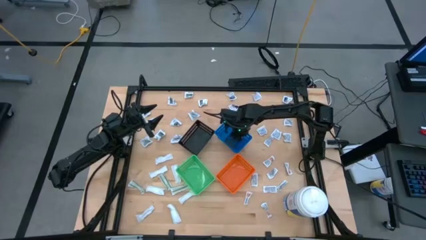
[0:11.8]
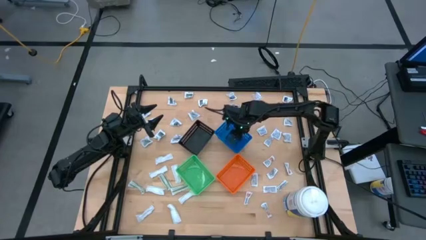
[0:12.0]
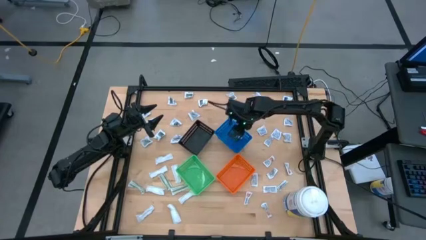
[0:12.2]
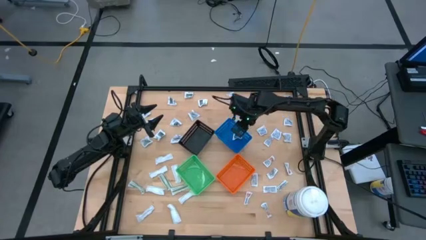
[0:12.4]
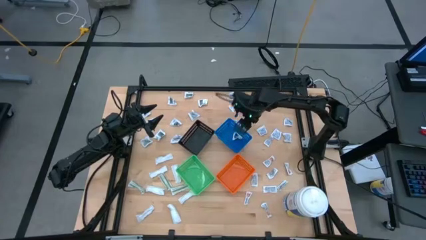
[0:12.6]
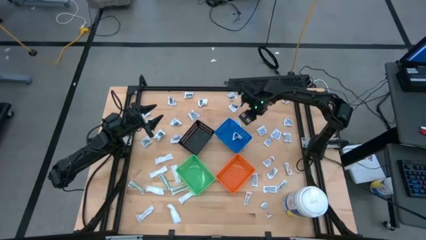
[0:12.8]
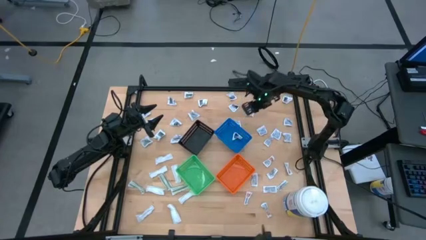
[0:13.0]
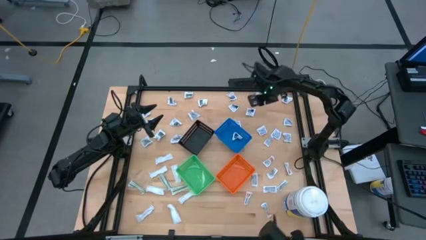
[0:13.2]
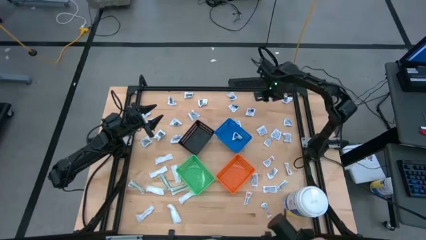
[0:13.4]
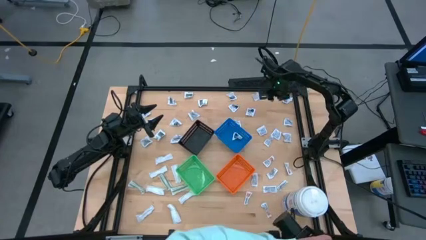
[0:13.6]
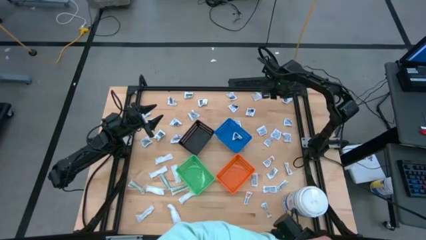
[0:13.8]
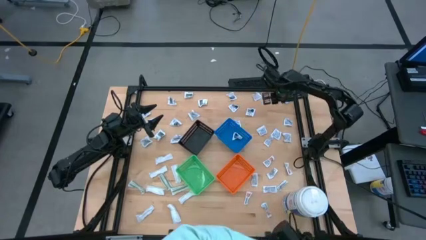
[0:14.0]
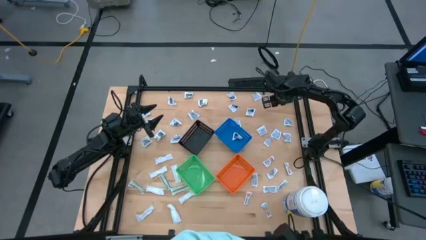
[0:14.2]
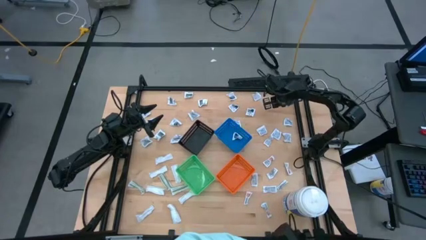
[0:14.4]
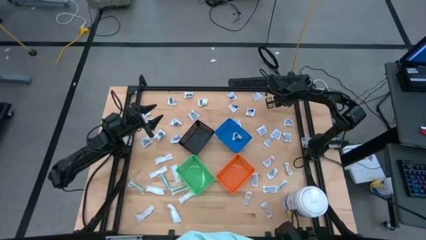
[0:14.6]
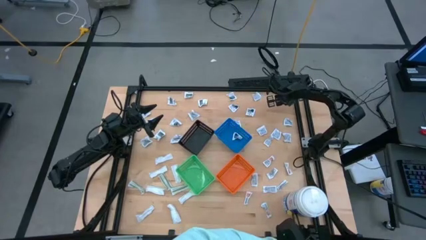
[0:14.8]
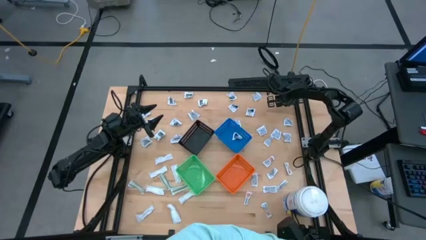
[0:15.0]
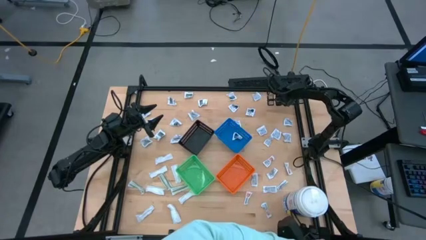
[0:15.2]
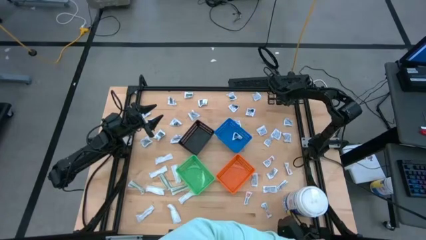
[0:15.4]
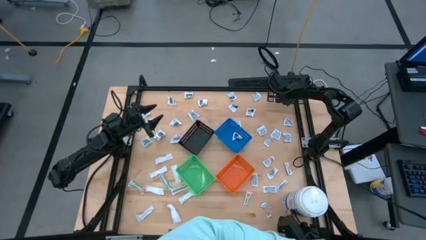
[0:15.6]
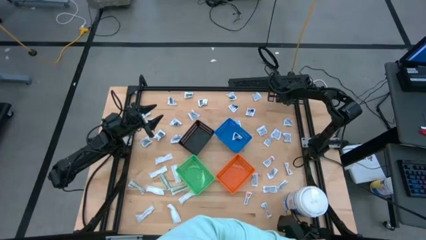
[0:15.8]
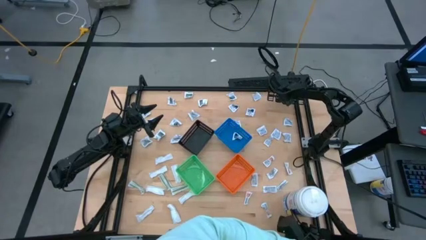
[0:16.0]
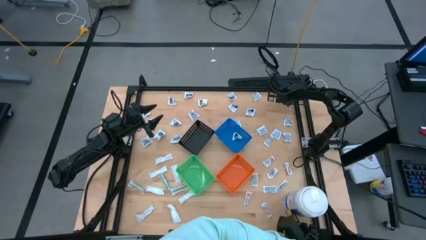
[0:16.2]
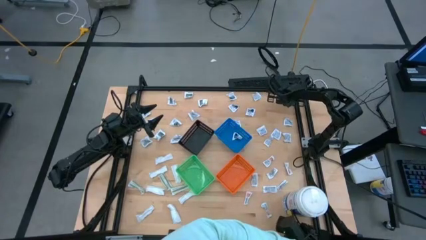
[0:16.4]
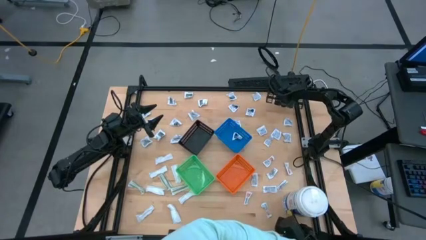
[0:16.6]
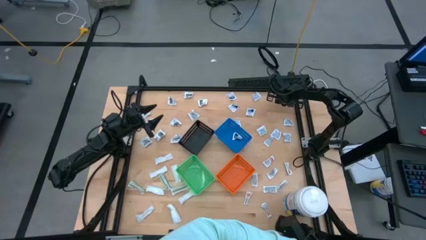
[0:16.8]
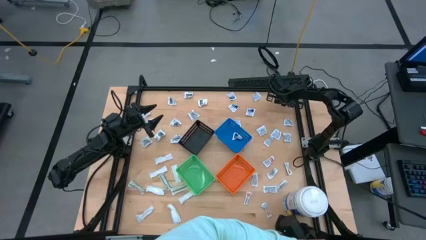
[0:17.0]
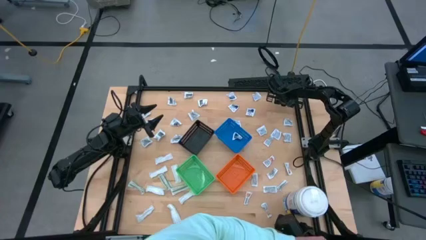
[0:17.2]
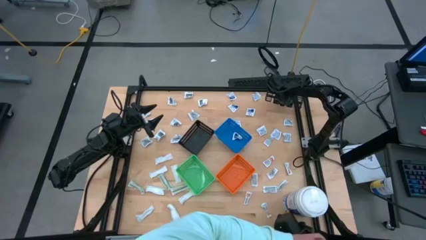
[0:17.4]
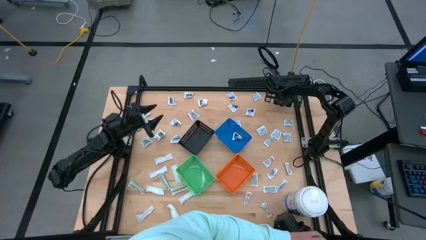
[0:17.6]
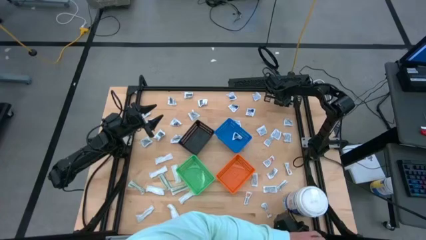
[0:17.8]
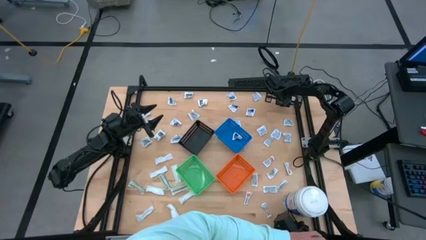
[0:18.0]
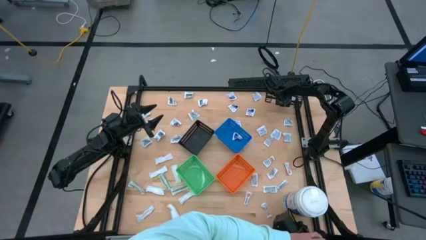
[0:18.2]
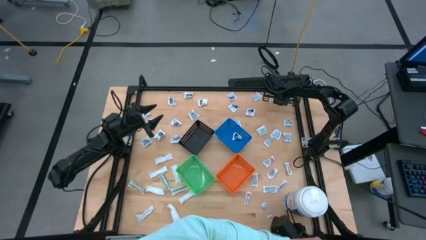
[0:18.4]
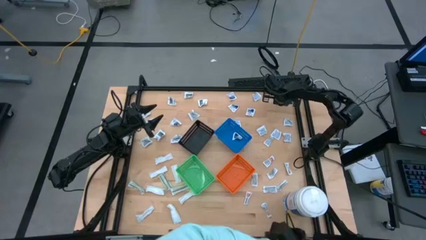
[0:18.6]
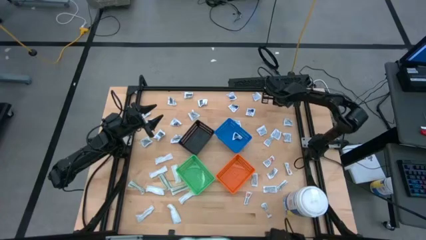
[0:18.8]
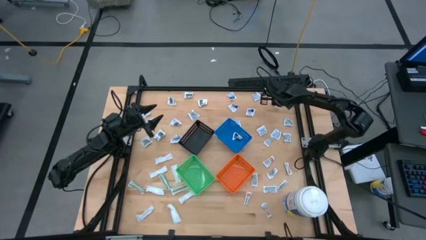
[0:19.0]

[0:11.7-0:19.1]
Task: Pick & Place First Aid Supplies
Put the blue alcohol pad into the blue bin

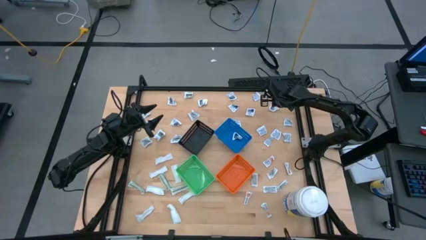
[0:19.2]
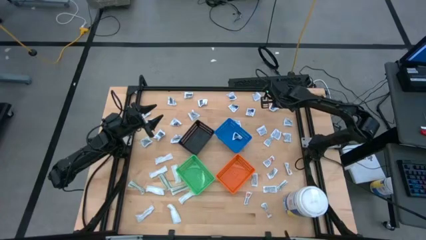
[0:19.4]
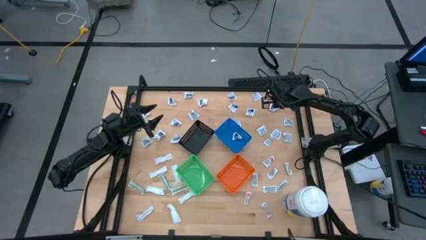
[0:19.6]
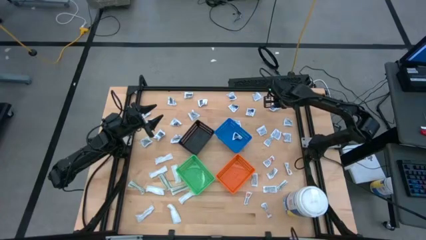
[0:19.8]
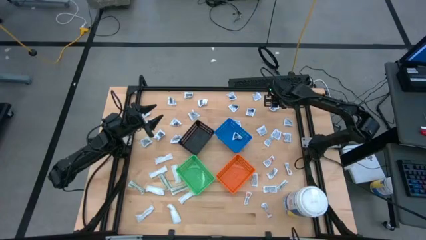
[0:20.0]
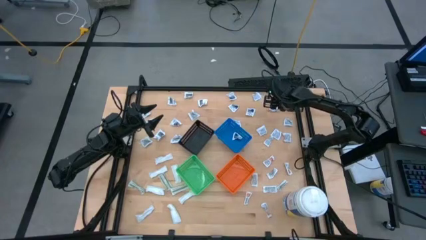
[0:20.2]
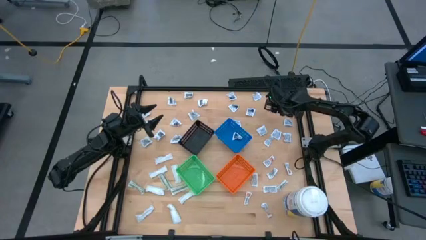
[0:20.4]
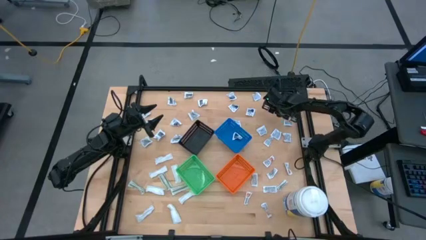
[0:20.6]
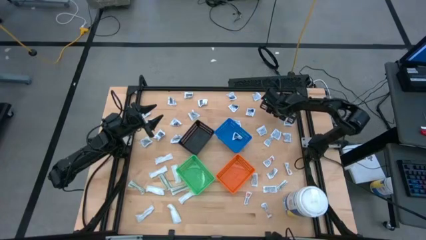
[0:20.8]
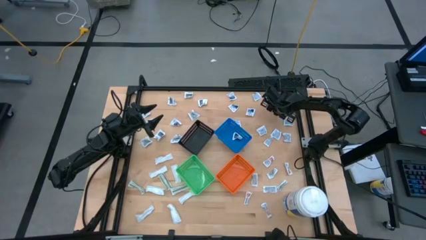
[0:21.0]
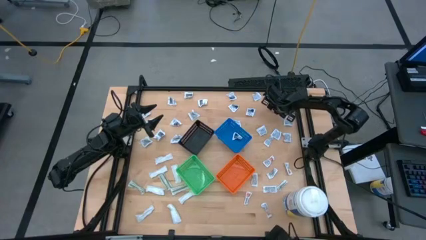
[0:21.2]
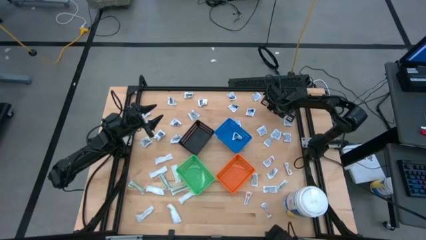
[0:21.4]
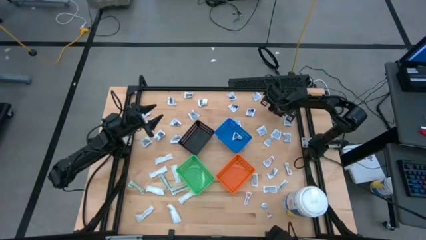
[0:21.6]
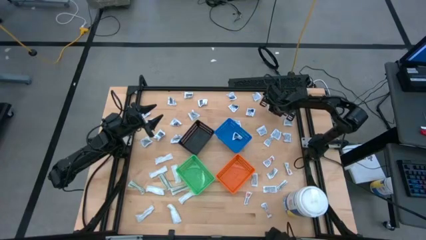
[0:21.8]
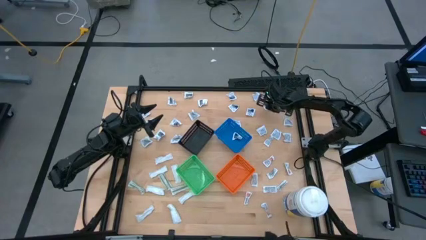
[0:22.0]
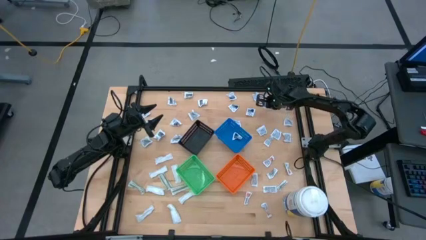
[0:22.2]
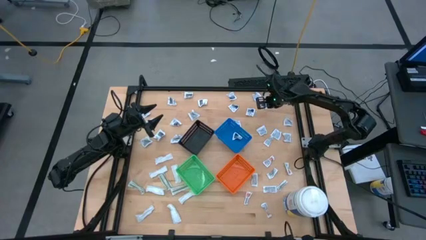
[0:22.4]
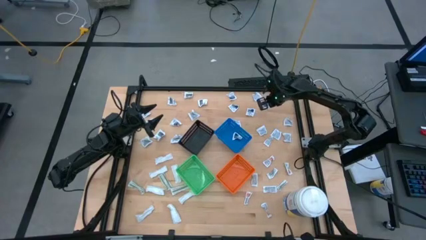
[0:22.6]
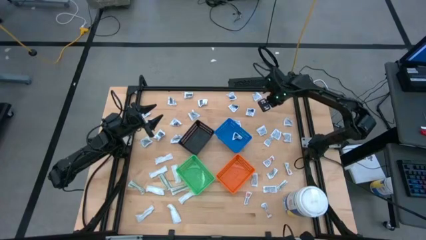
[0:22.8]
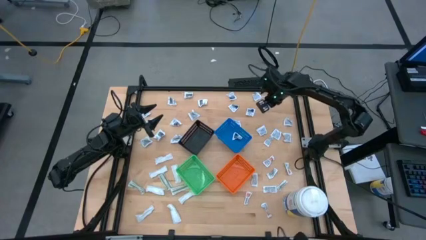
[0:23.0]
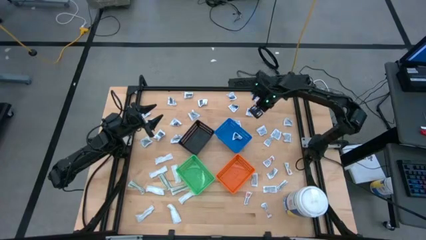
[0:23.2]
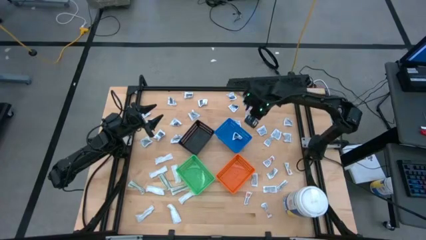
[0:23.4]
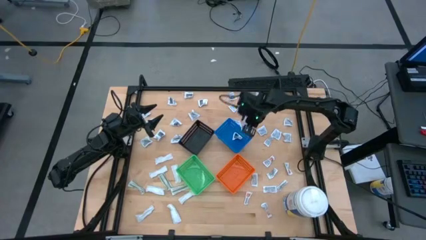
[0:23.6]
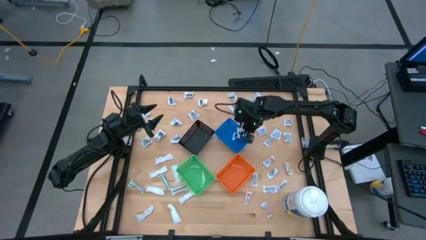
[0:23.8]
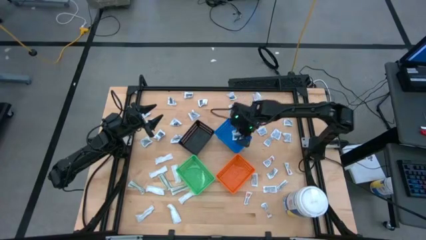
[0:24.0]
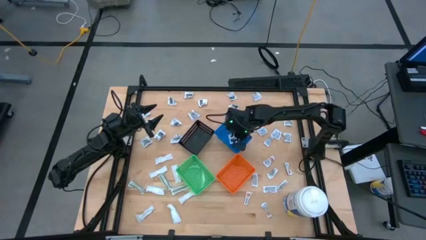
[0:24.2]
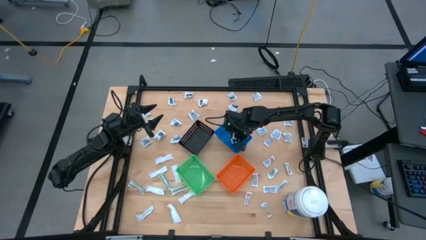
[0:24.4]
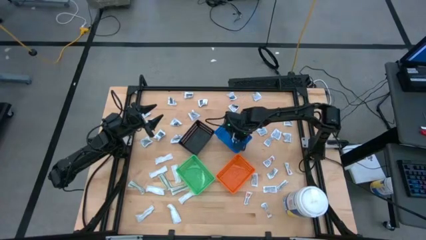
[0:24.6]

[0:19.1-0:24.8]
Put the blue alcohol pad into the blue bin

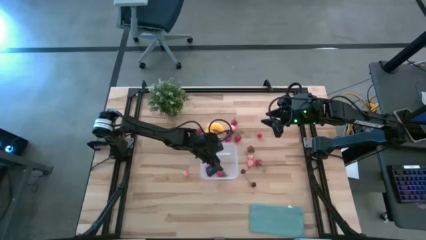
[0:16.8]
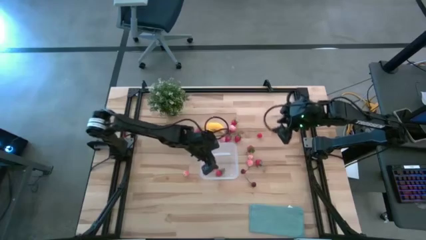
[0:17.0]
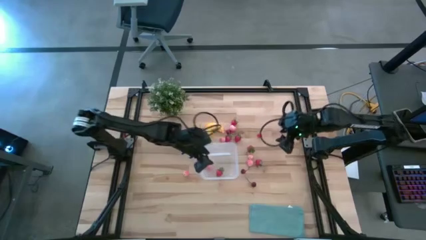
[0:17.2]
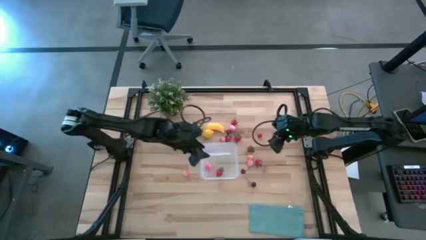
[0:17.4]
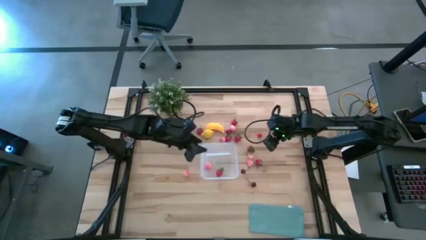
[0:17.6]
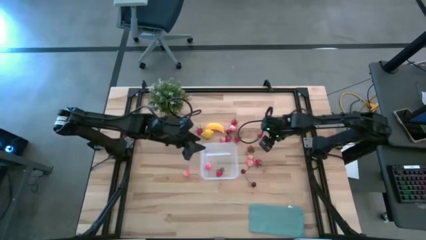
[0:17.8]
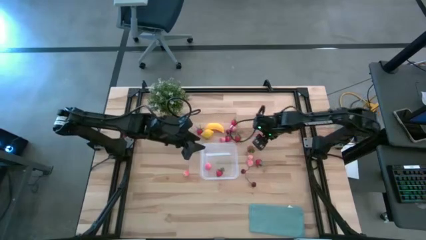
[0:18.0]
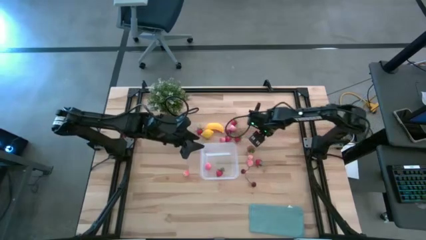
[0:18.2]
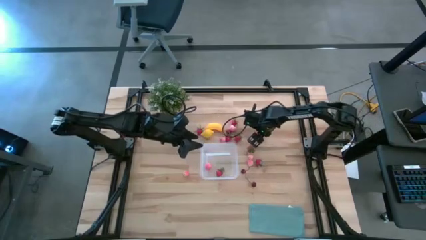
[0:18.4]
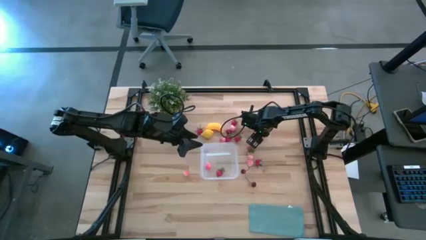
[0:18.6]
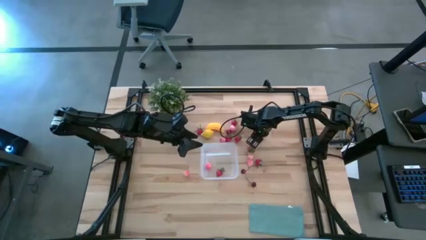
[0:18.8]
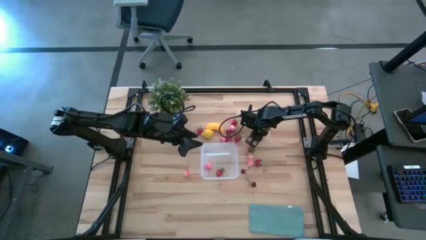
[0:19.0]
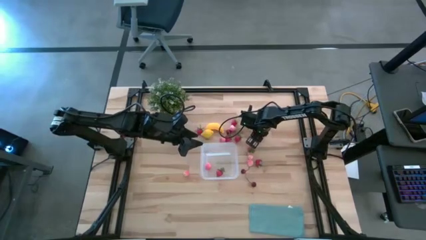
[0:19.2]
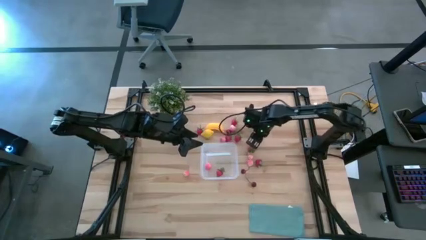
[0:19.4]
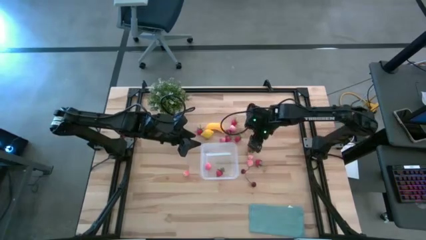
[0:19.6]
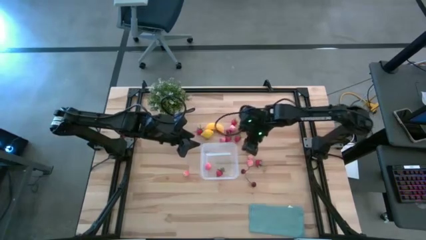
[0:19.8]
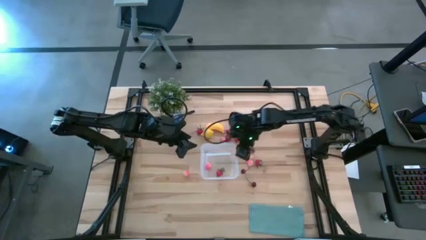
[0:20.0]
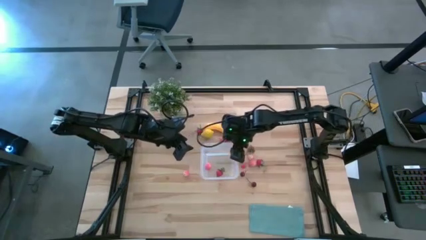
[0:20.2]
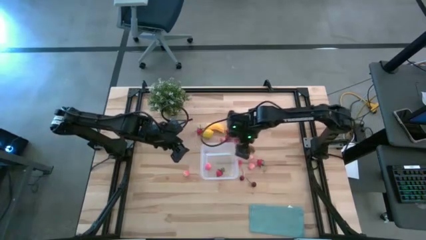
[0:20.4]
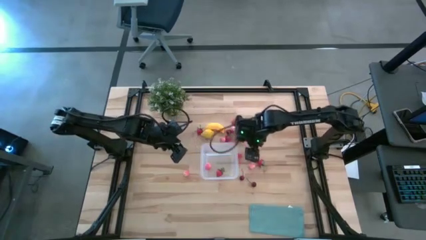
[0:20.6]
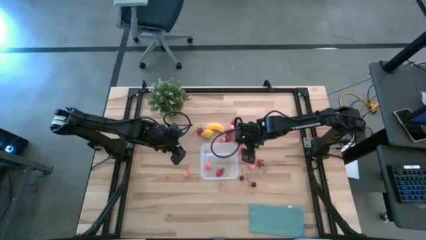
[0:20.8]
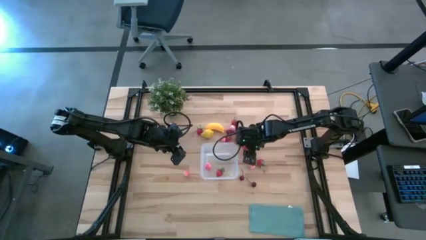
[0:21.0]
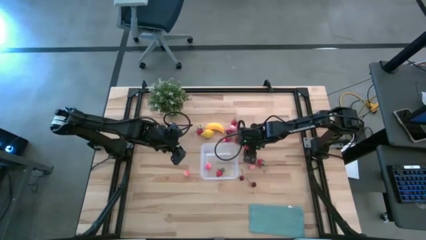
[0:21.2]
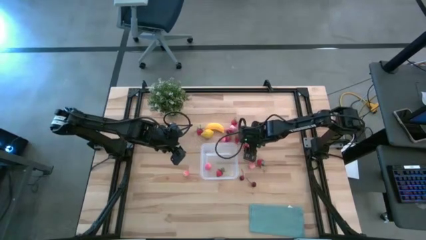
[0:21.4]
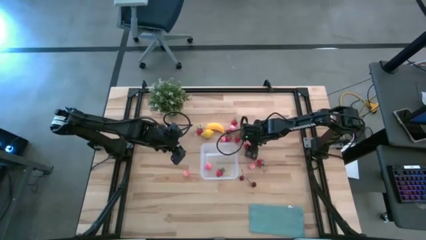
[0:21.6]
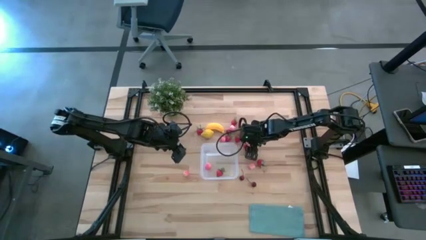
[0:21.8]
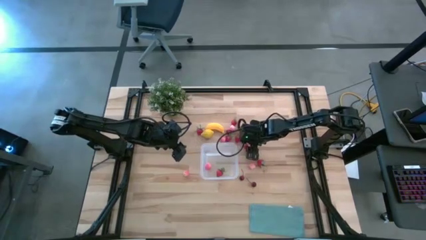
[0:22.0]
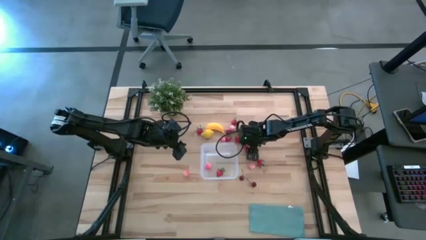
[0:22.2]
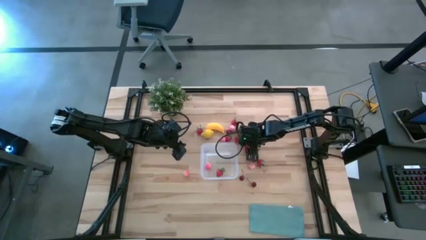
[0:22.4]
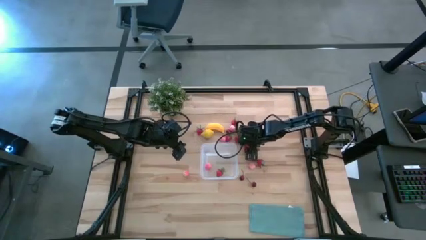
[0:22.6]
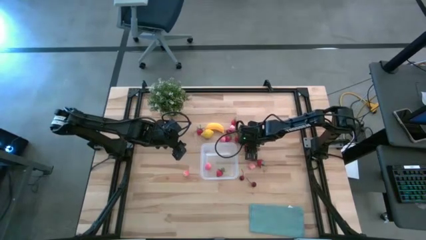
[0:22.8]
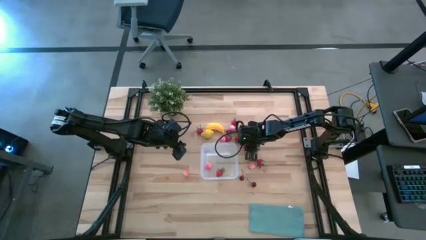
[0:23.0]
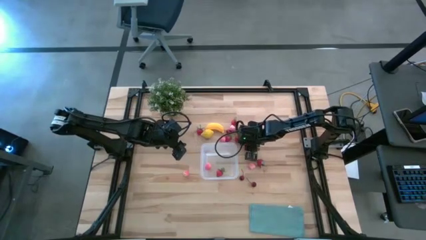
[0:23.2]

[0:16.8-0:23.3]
Task: Pick and placing Produce into tupperware
Put the red cherry into the transparent container
